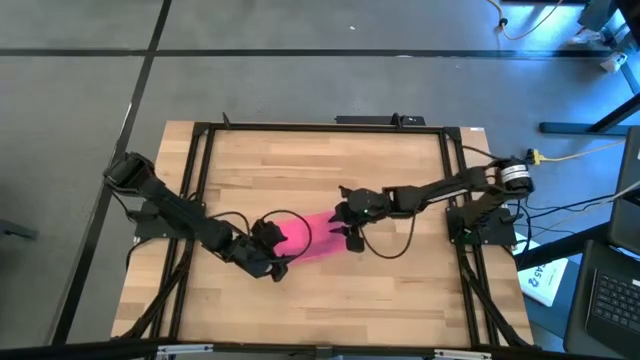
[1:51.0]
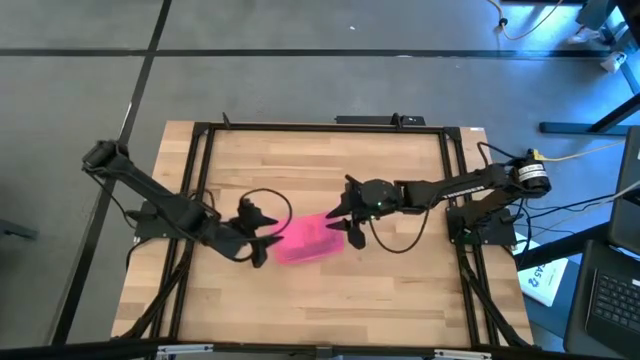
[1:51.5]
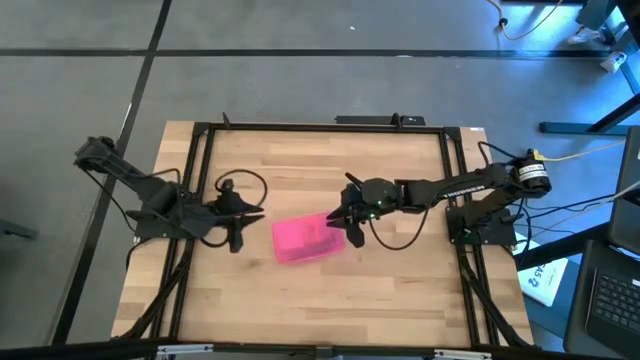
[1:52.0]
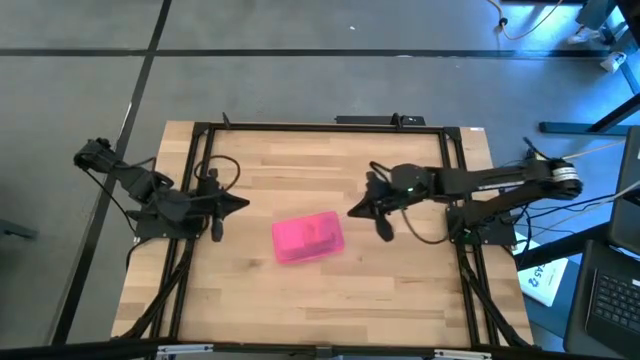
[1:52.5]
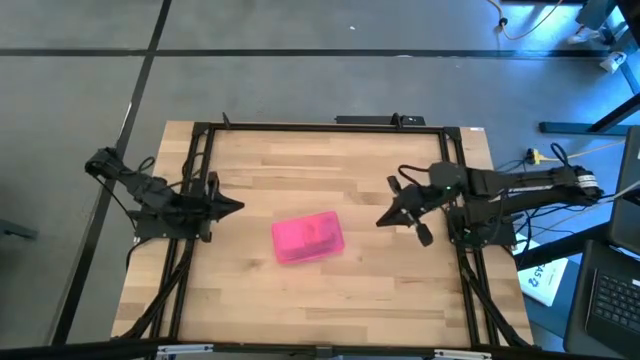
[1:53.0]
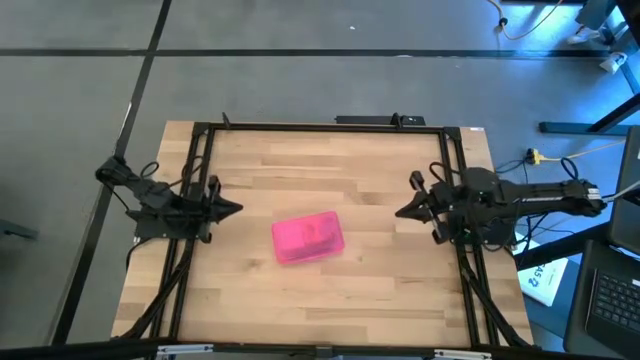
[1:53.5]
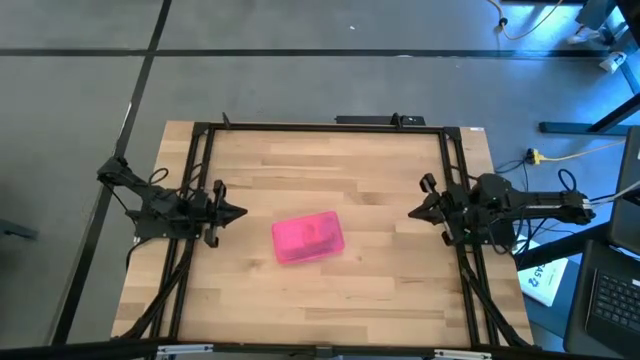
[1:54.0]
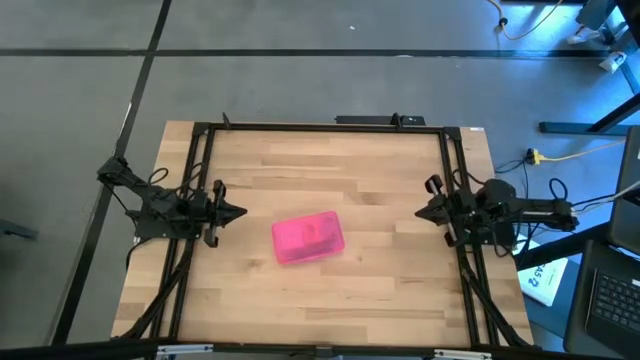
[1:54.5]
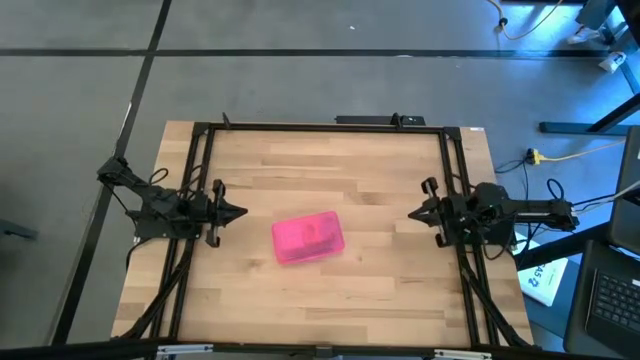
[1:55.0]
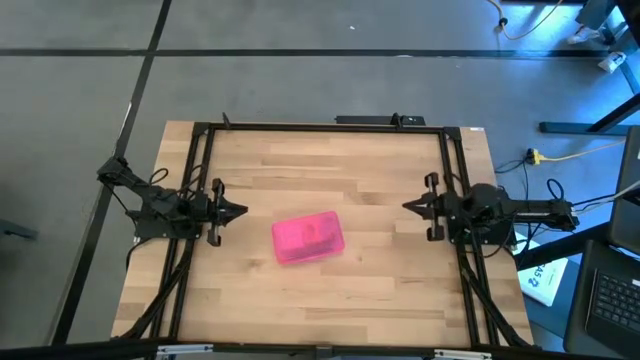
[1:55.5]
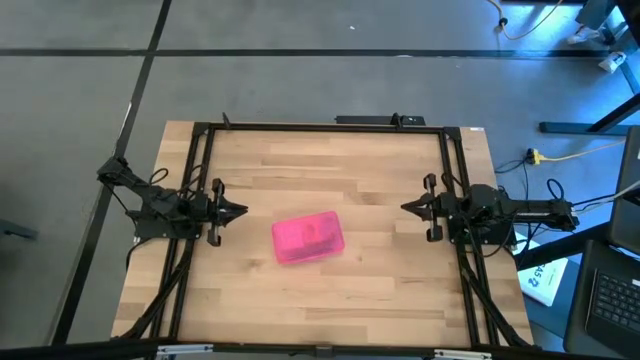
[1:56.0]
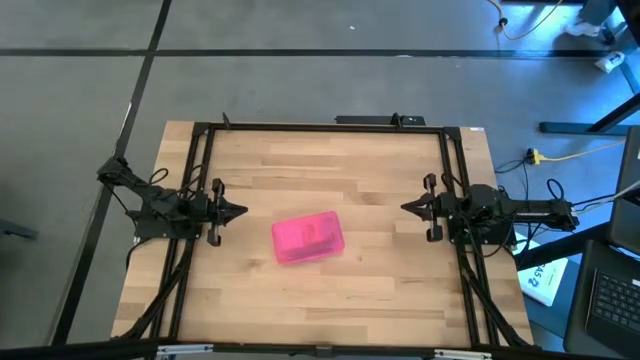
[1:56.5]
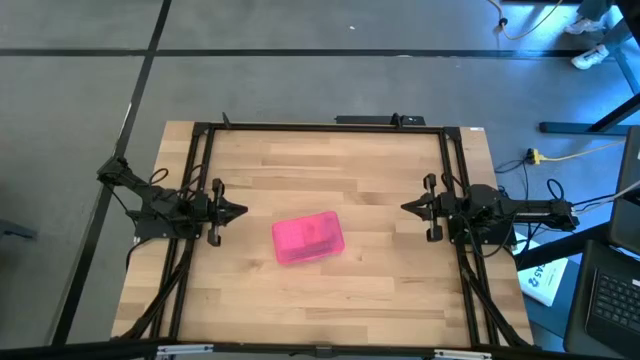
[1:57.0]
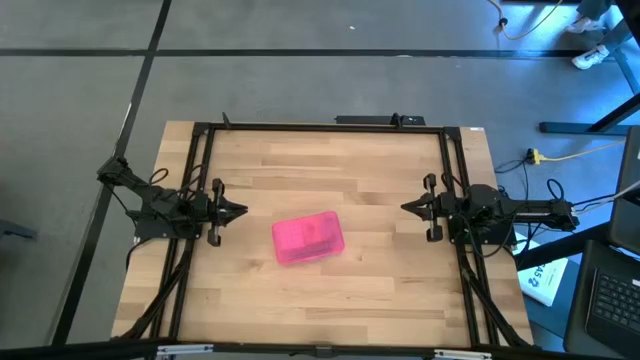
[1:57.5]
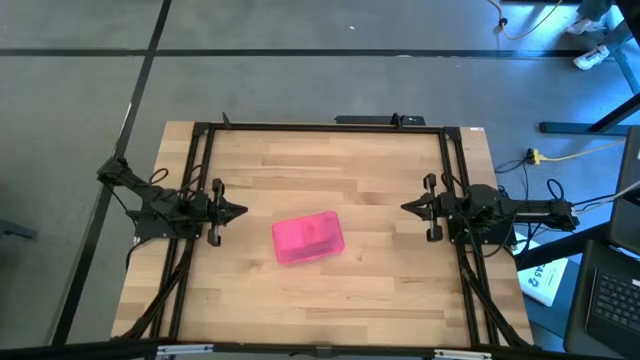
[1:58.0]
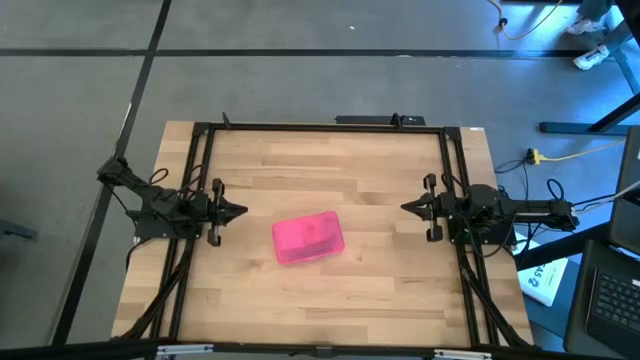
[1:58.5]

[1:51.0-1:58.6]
Task: Pack school essentials
Return to Home Position

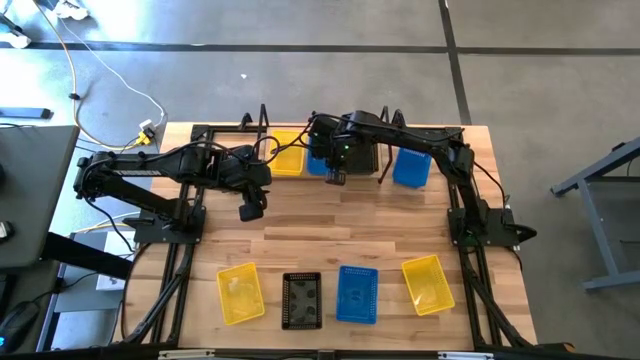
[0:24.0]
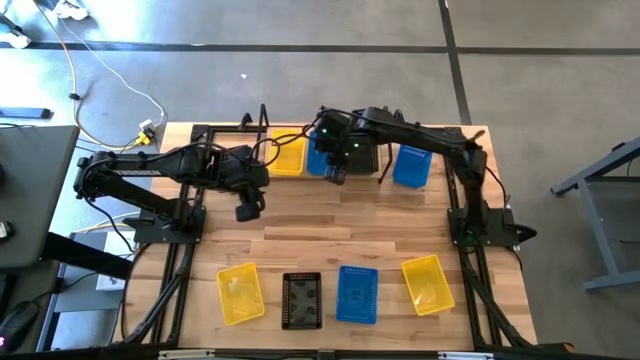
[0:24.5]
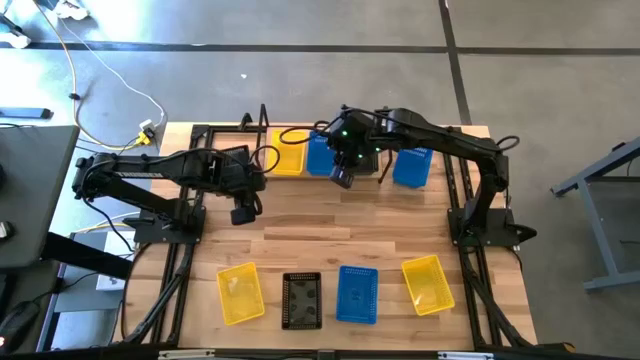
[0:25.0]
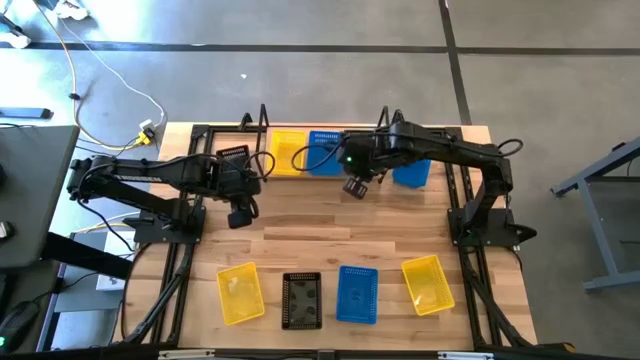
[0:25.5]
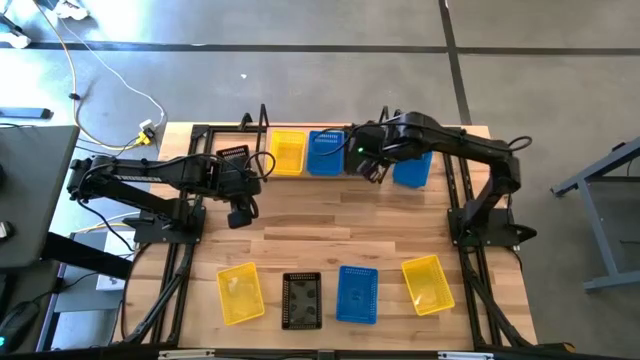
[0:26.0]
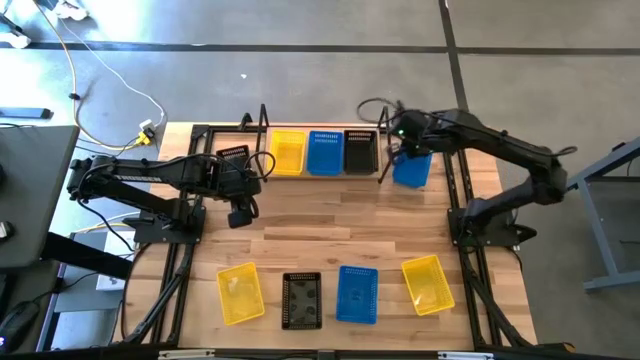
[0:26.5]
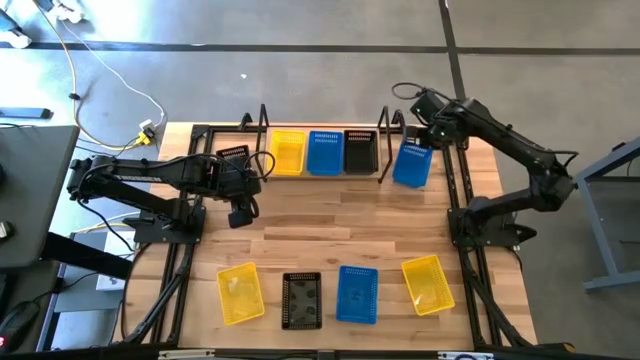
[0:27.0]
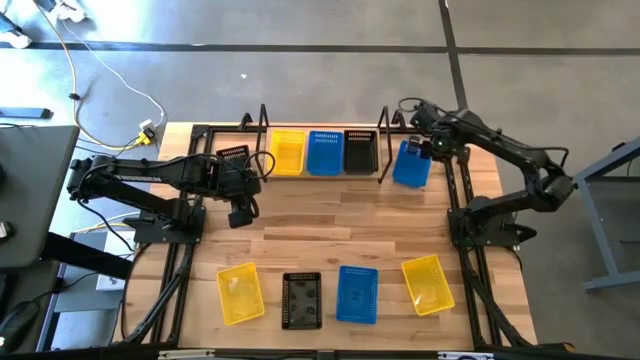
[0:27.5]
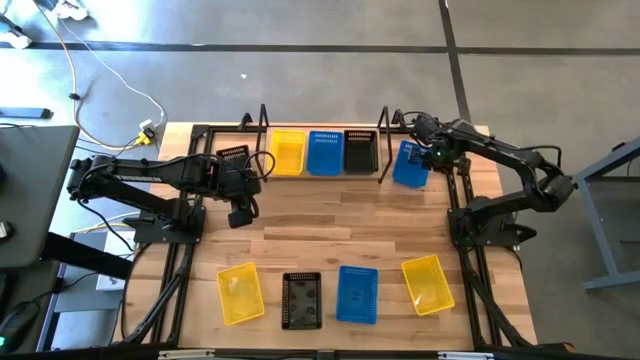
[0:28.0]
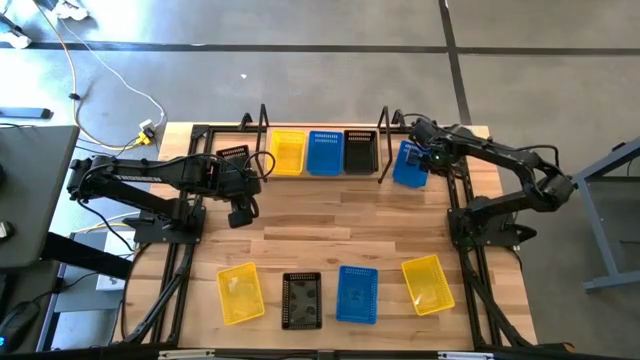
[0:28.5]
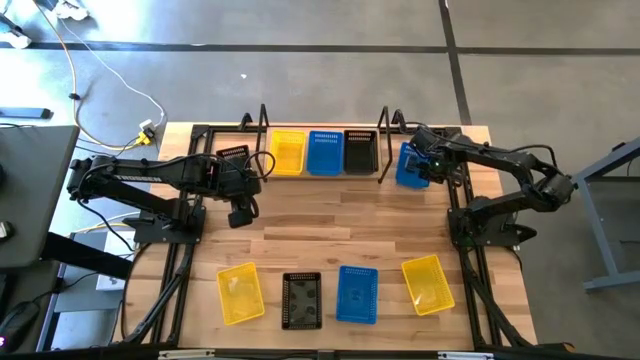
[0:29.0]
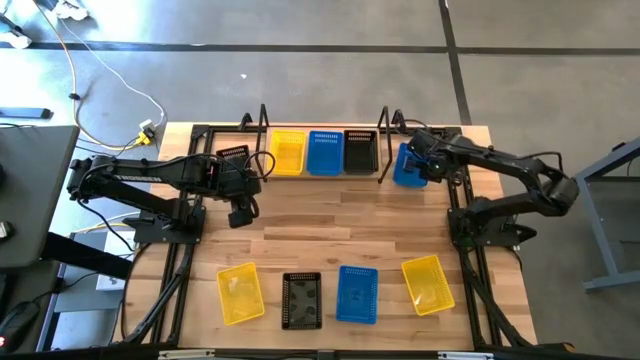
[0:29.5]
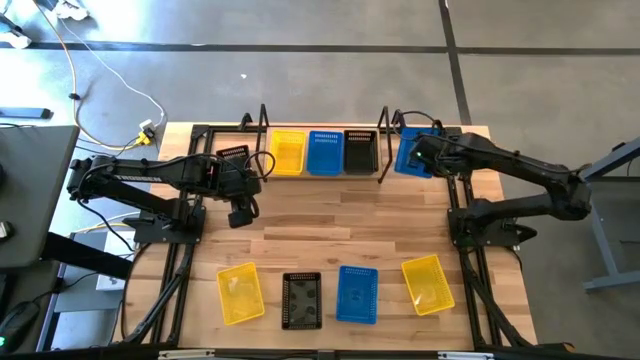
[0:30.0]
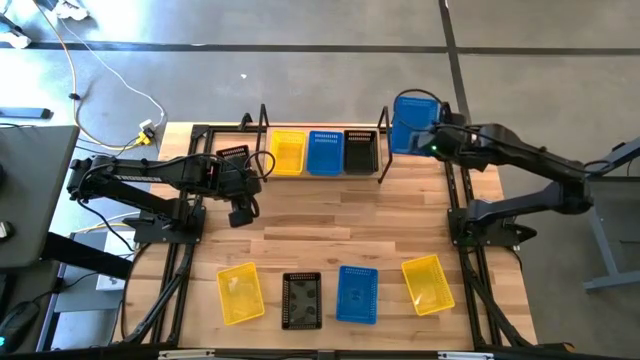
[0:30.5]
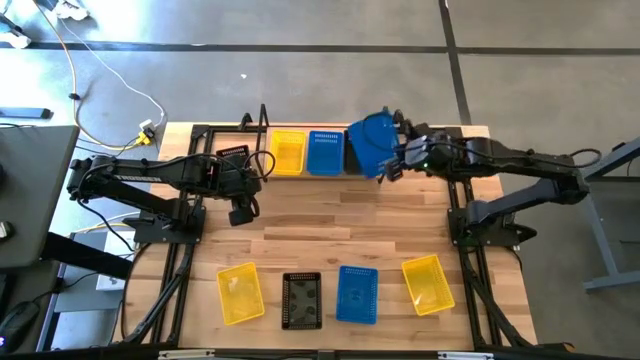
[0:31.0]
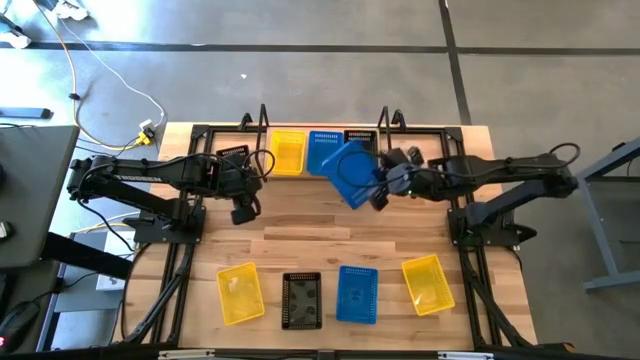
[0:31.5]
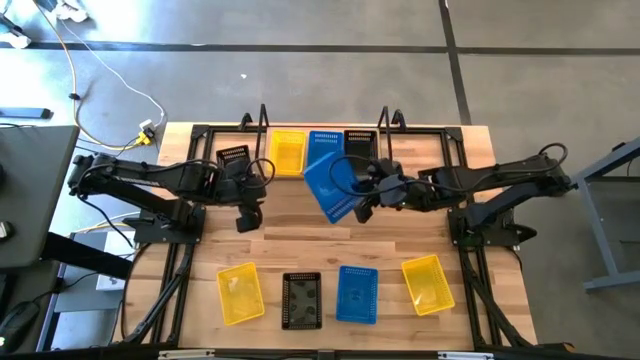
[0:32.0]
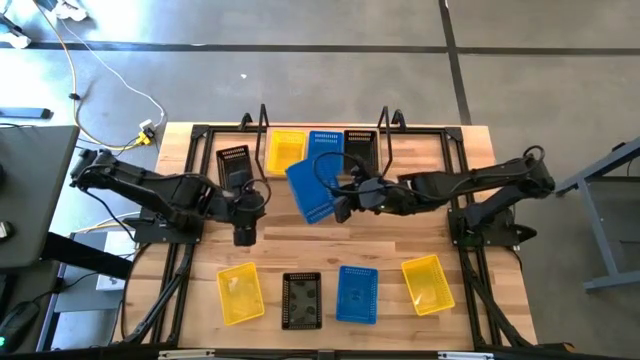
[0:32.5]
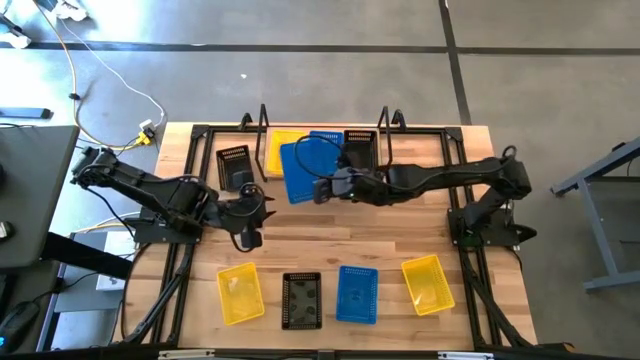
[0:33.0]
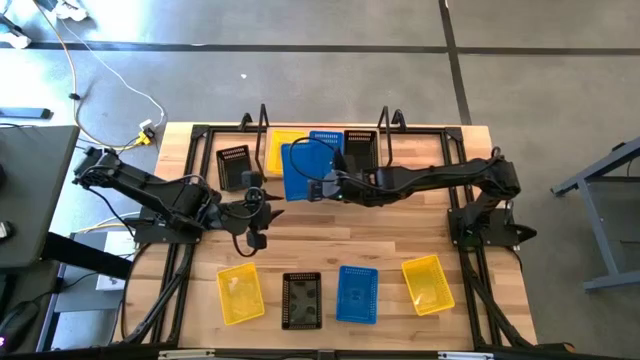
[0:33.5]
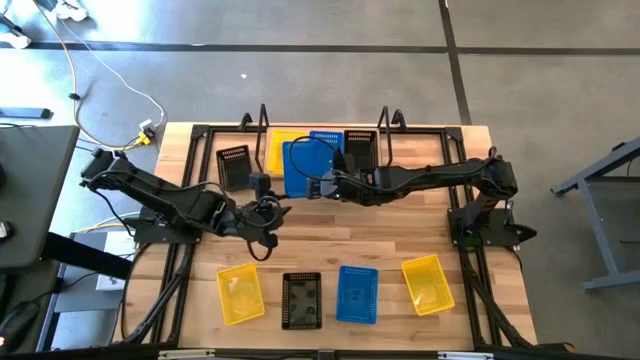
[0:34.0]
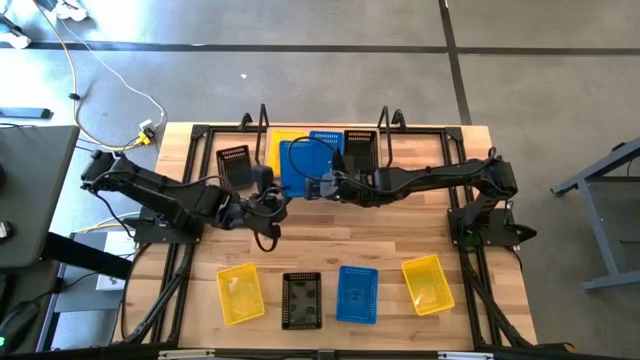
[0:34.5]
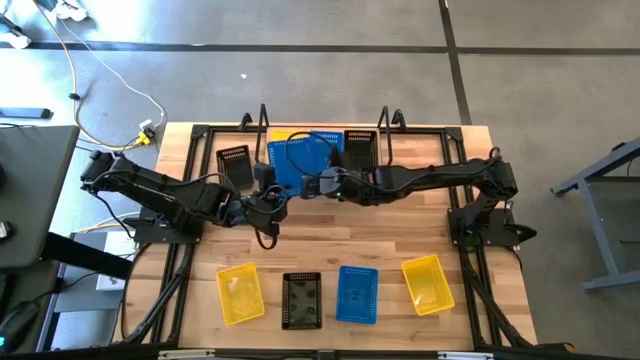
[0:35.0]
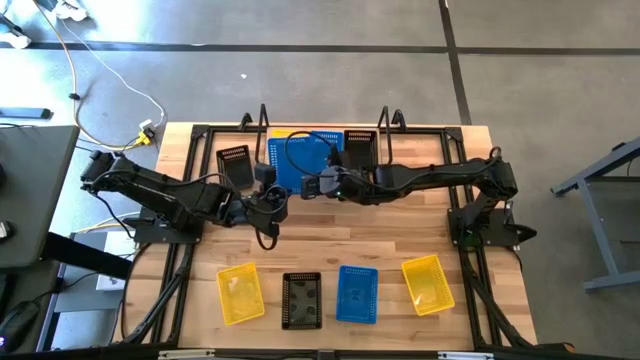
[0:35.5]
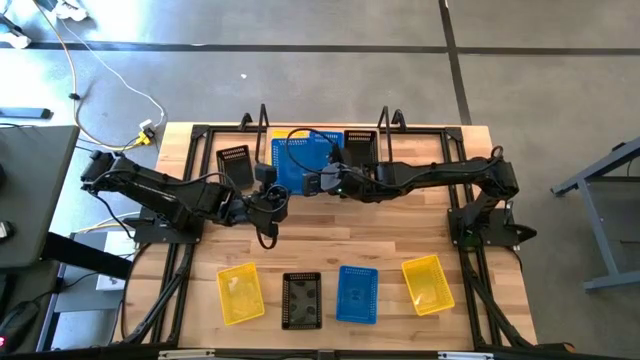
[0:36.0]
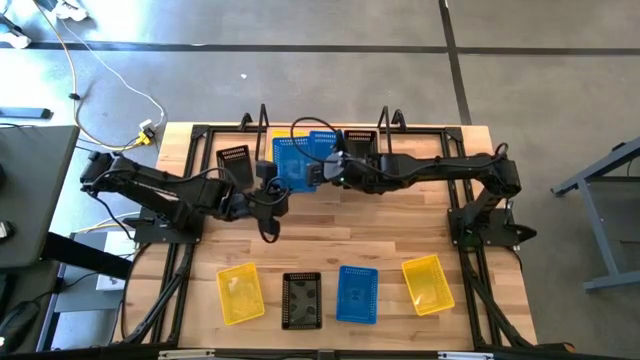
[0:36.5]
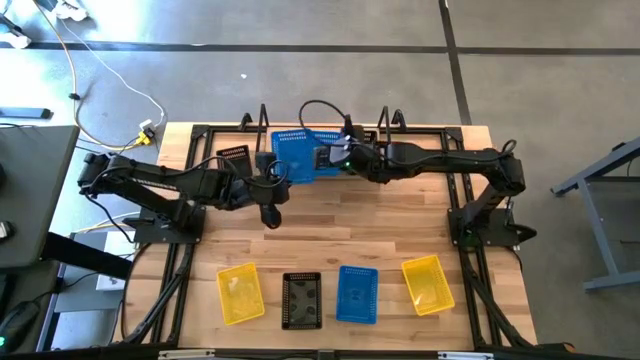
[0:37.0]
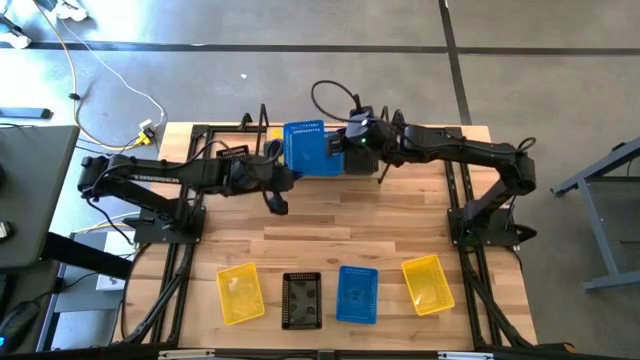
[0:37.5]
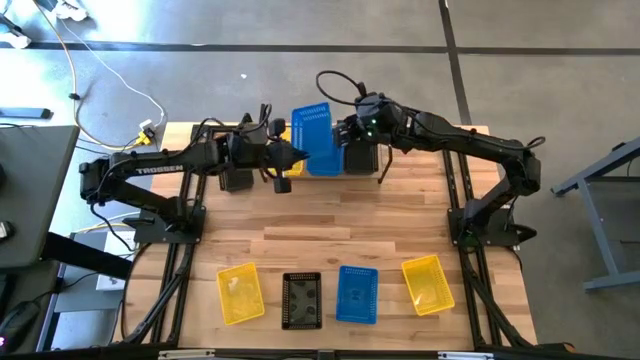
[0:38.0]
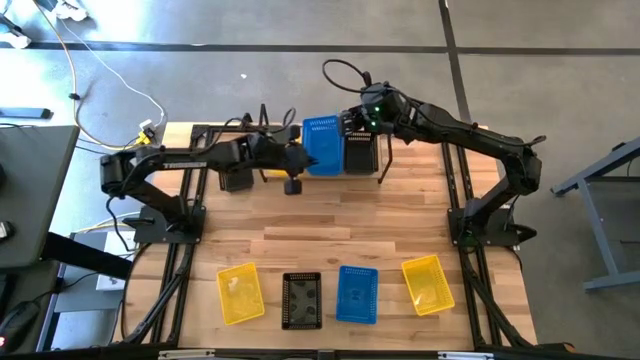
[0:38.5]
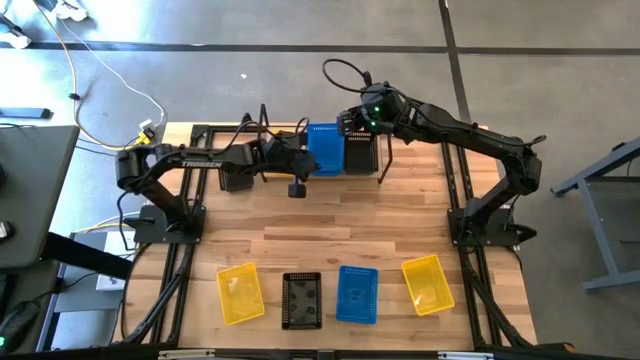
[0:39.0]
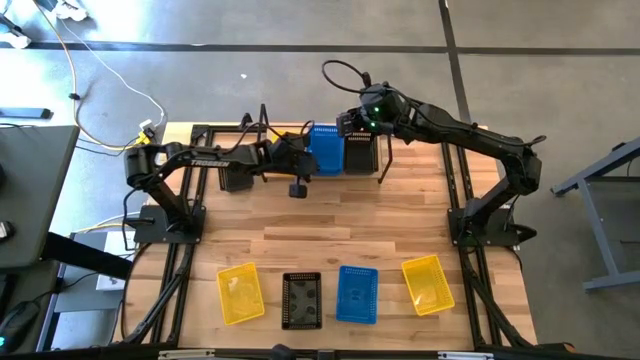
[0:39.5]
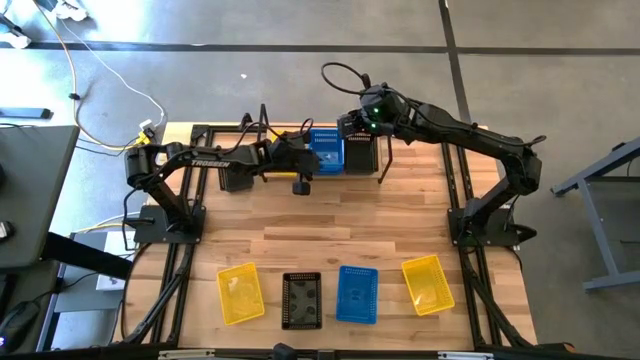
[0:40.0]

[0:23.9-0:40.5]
Task: Stack baskets on shelf by color
Stack the top blue basket on top of the blue basket on the shelf
